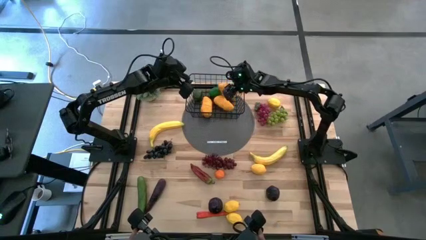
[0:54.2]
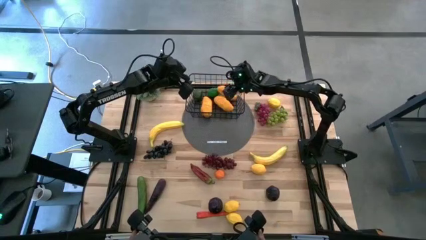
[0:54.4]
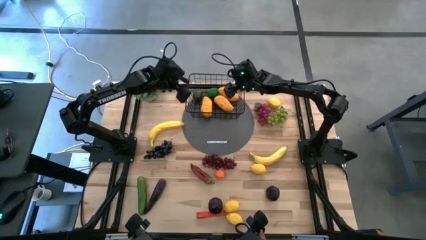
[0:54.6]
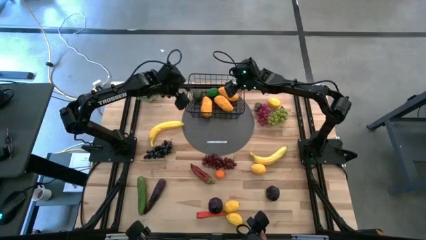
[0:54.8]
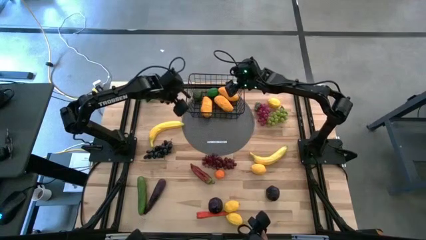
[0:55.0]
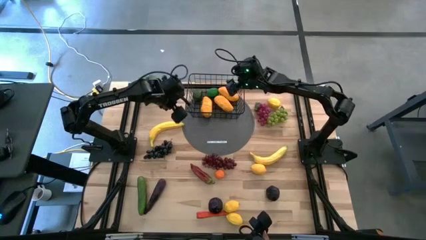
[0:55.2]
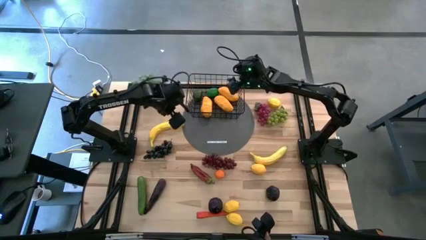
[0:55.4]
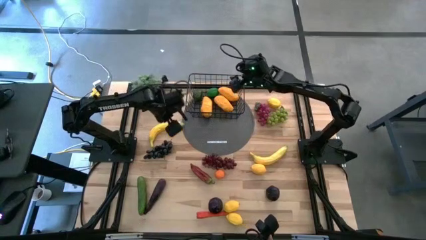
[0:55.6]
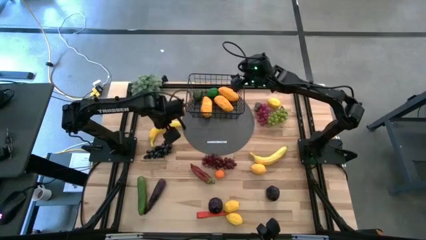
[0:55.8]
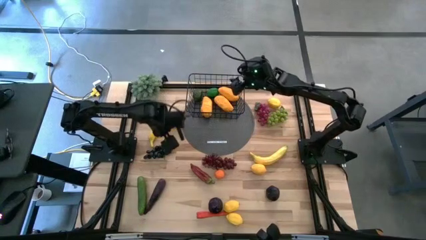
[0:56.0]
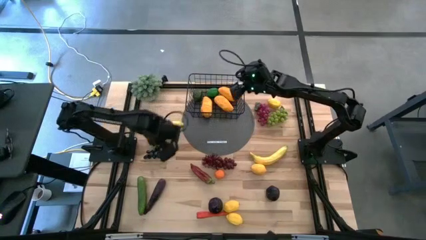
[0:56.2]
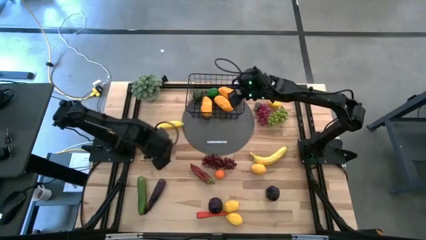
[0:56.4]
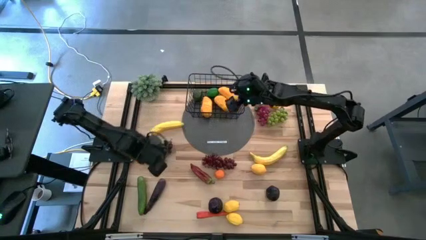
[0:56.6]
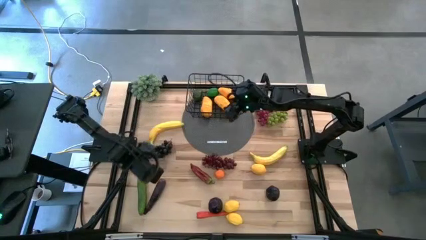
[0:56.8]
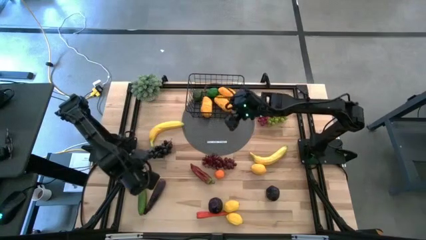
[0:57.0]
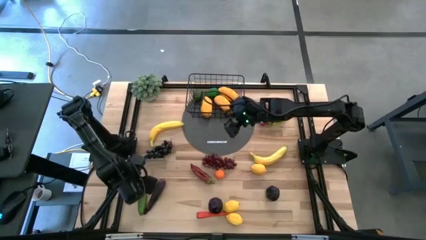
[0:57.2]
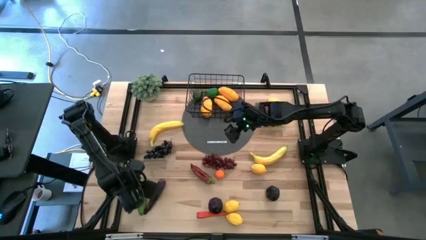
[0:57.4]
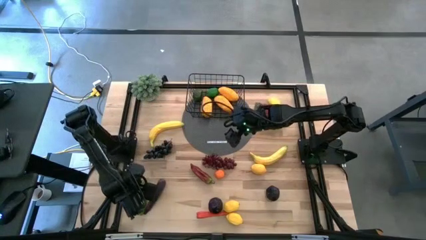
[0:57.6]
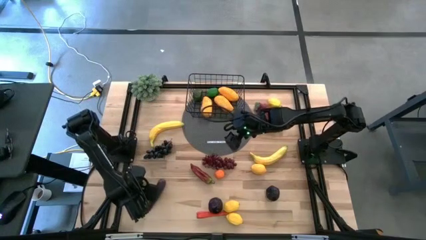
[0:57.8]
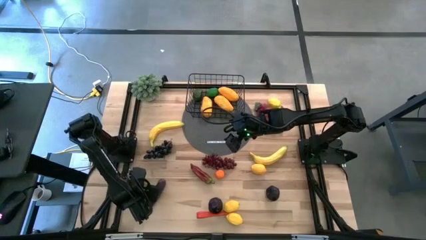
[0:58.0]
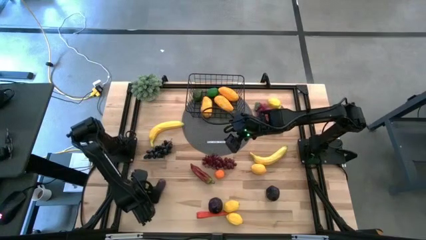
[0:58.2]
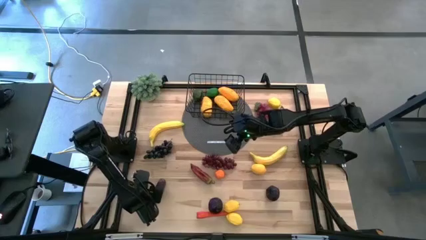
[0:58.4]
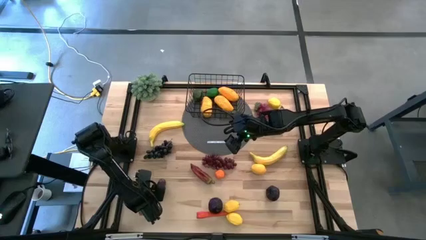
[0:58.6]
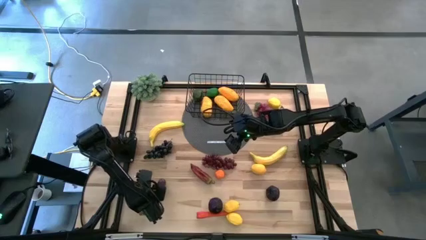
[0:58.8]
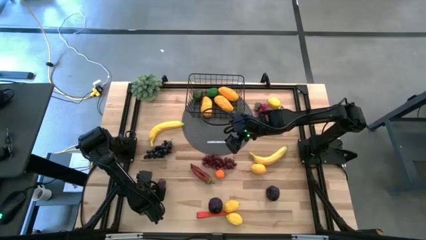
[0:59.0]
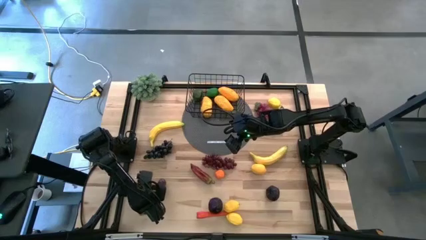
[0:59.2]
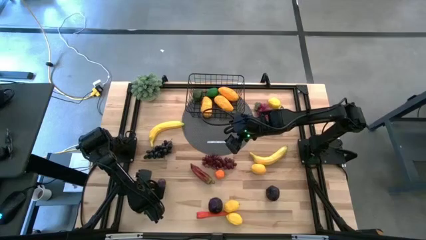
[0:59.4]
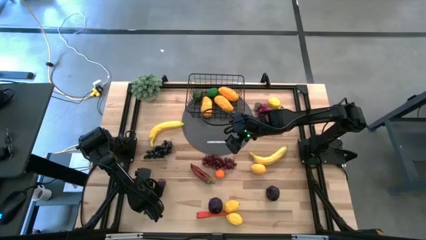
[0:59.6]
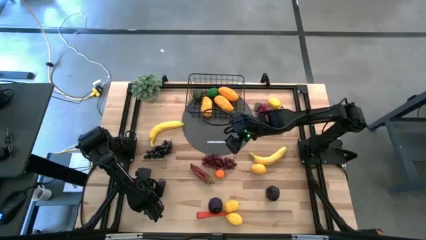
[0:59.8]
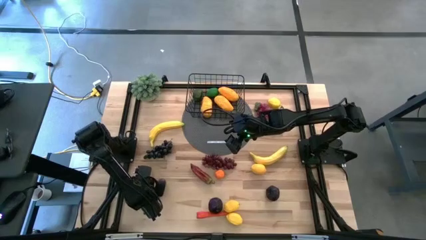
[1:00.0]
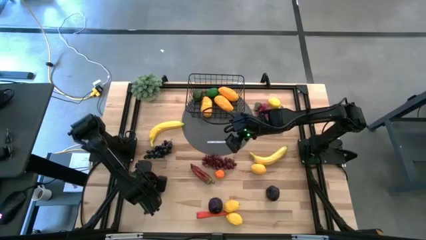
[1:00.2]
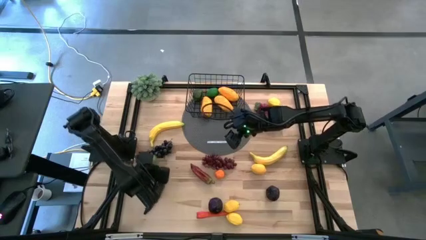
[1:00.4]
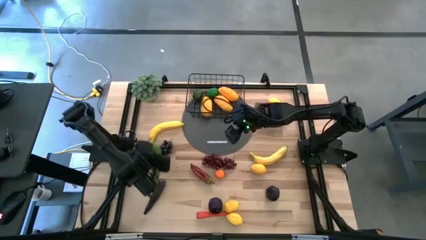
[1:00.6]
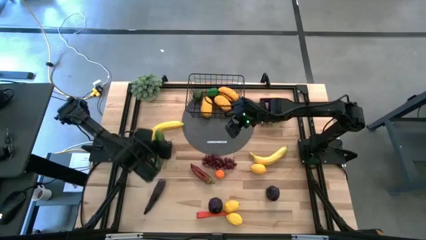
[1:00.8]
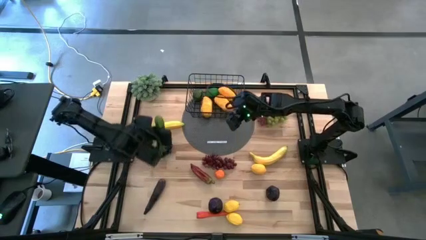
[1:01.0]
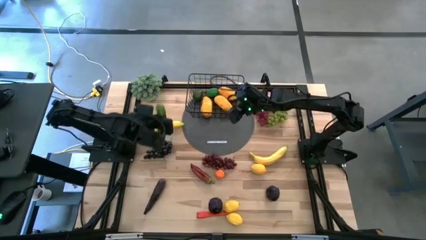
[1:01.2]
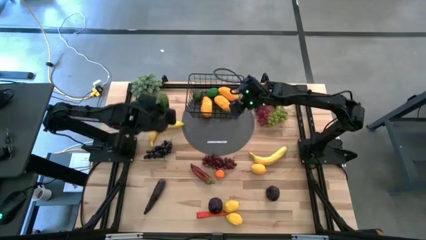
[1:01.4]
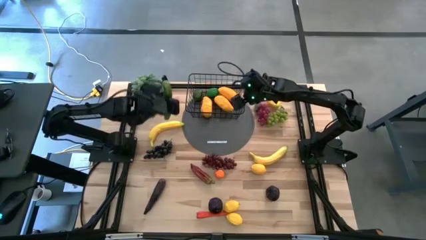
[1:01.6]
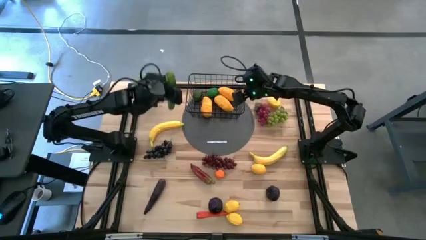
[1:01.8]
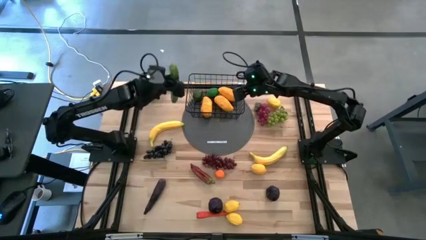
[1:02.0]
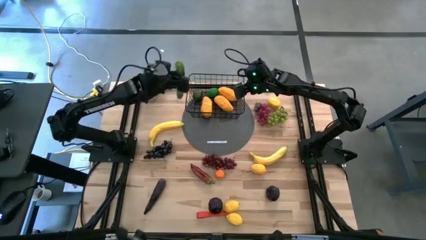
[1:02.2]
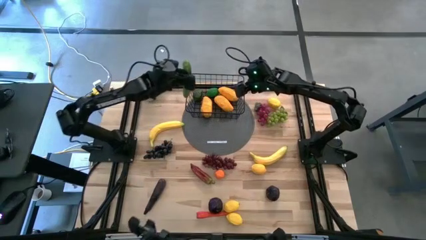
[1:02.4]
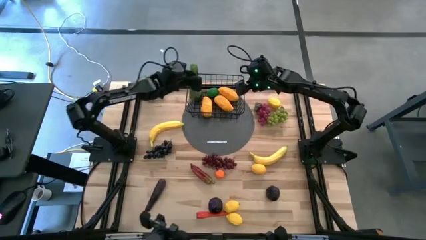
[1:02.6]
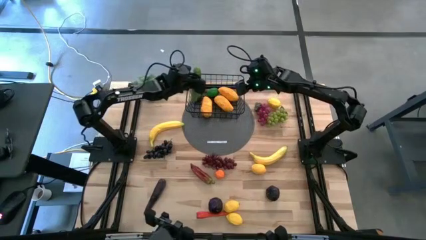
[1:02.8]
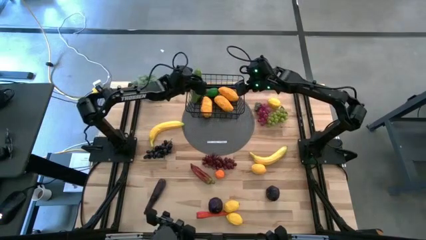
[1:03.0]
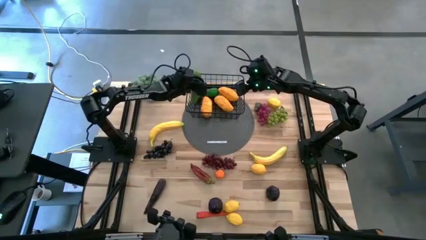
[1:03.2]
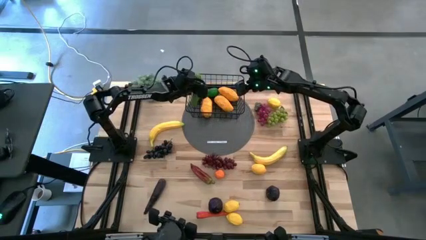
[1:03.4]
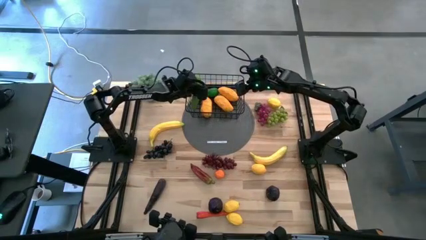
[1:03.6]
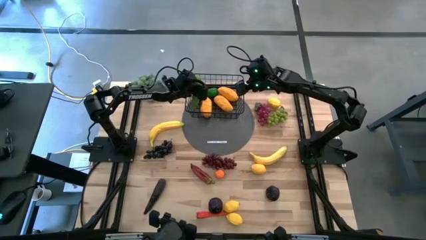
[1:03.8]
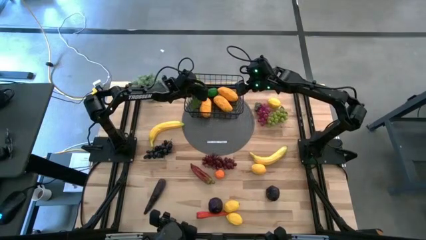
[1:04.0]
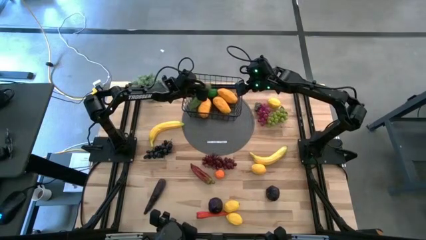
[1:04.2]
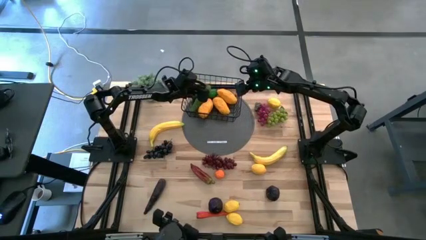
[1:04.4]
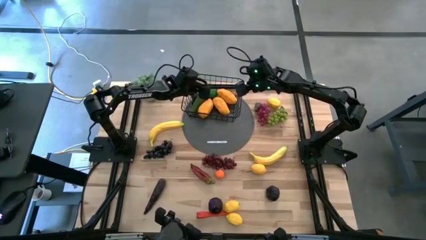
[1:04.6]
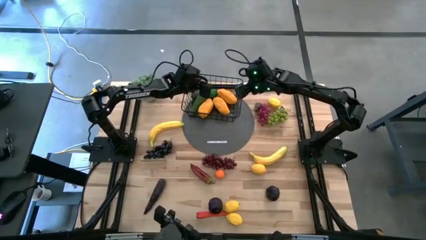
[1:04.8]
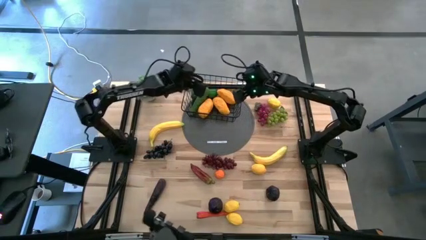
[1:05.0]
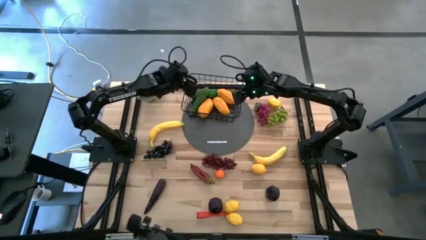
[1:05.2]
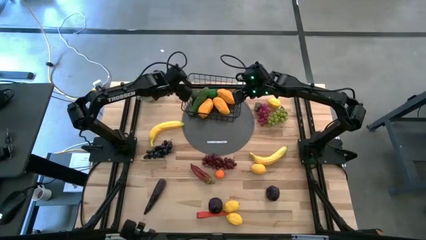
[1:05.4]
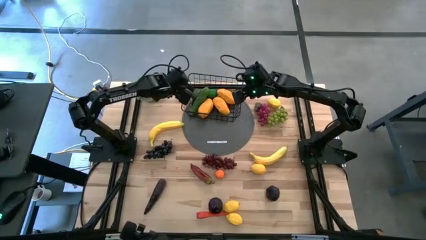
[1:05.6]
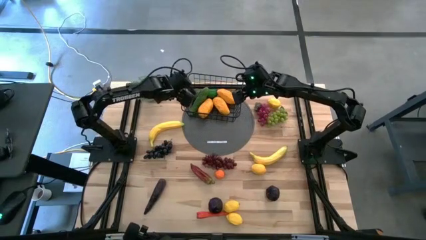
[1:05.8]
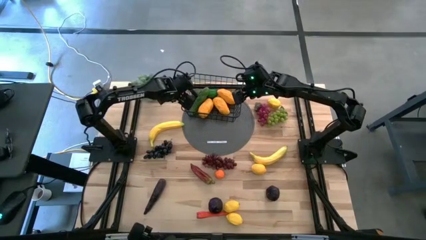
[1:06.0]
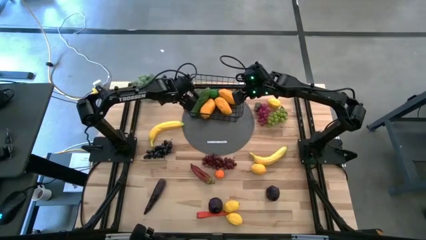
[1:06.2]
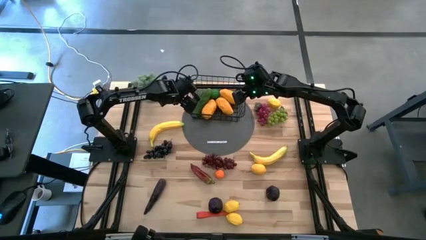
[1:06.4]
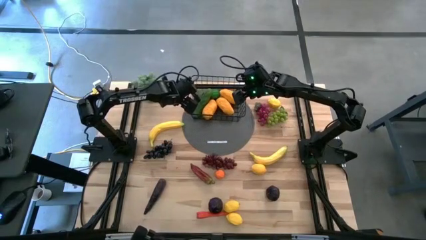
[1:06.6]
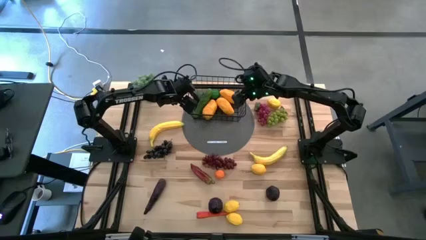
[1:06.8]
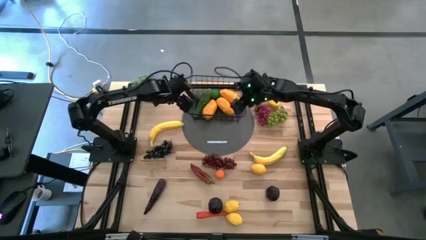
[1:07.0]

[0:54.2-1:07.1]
Task: Build produce basket
Put the green cucumber into the black wire basket
